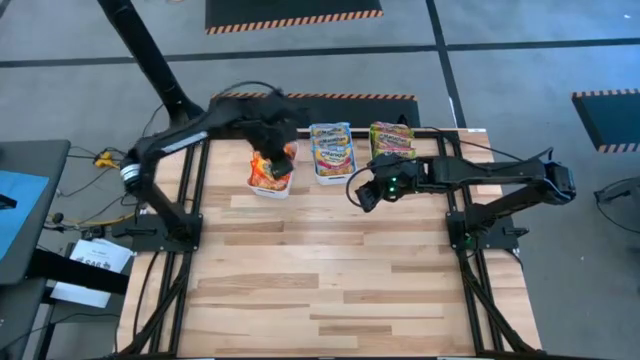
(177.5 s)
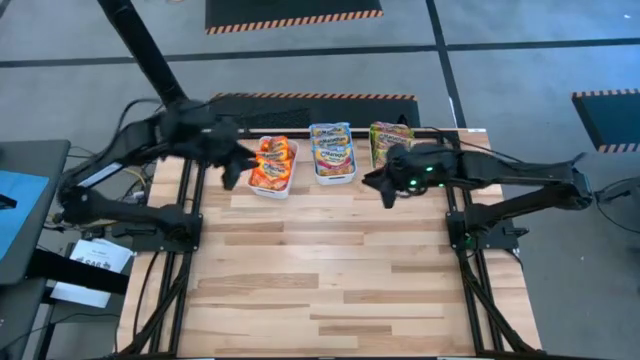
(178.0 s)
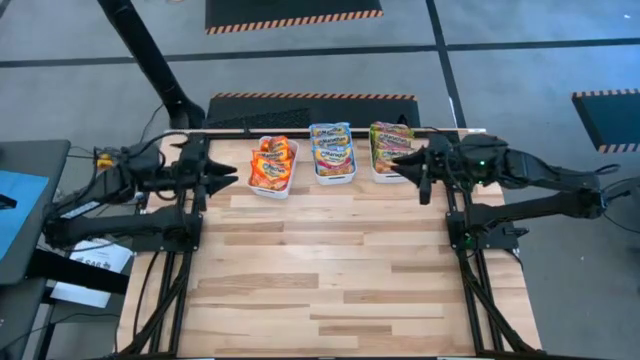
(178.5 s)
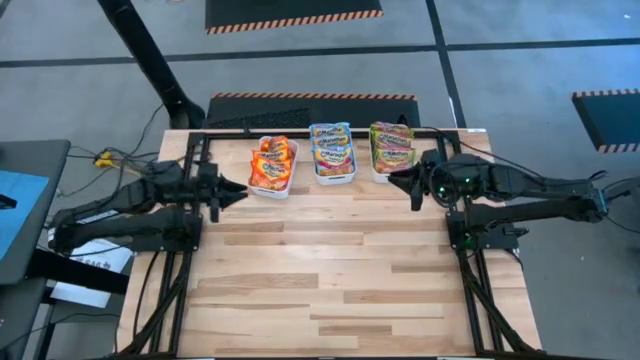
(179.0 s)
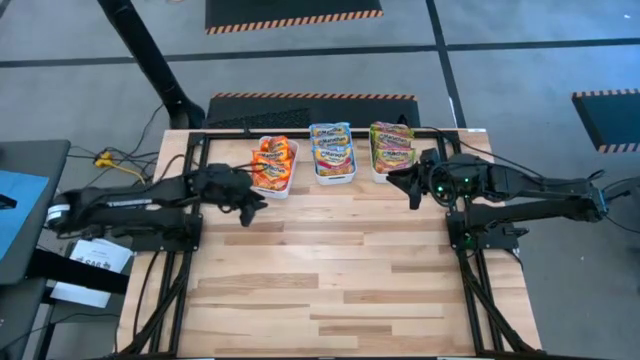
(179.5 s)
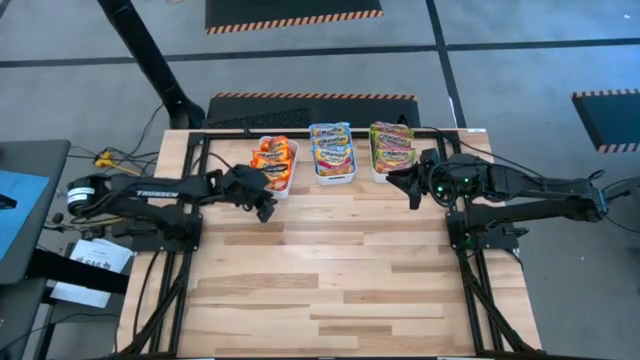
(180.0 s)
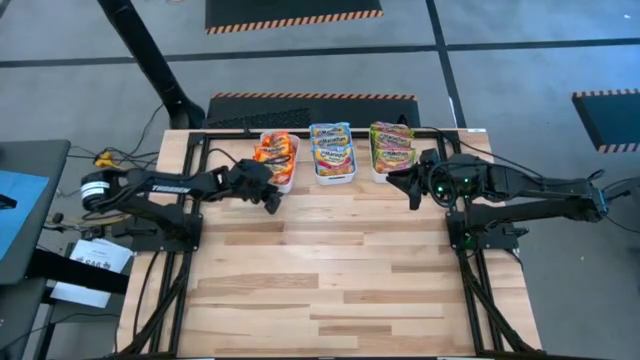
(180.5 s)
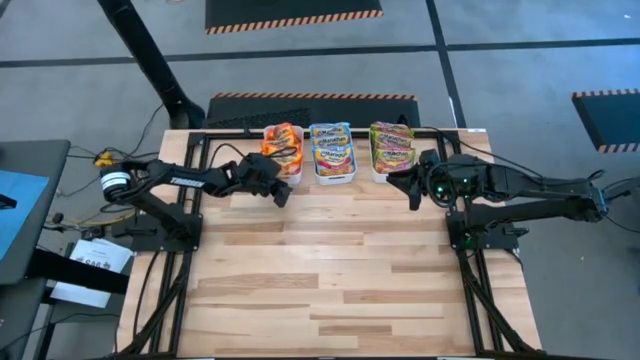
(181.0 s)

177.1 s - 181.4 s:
Task: Sort Maruchan noodles
Adjust the left white bin

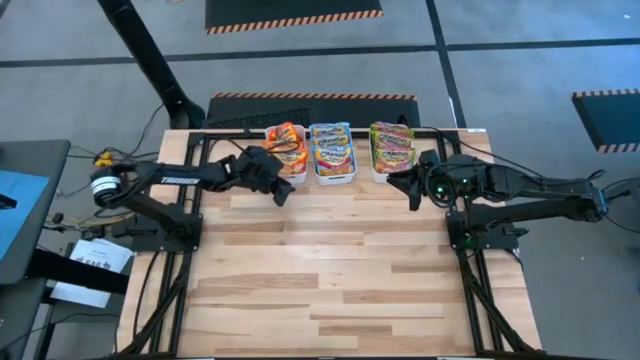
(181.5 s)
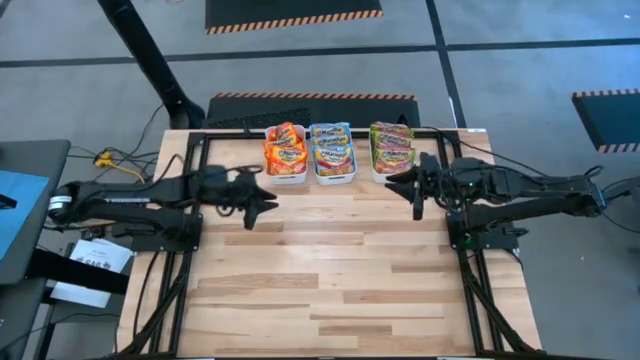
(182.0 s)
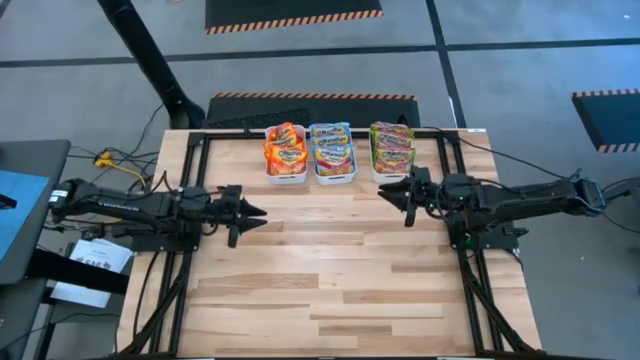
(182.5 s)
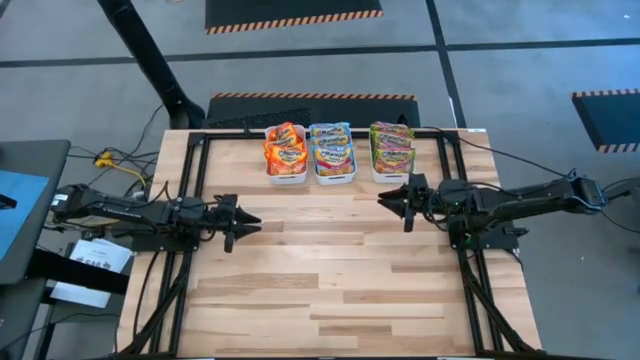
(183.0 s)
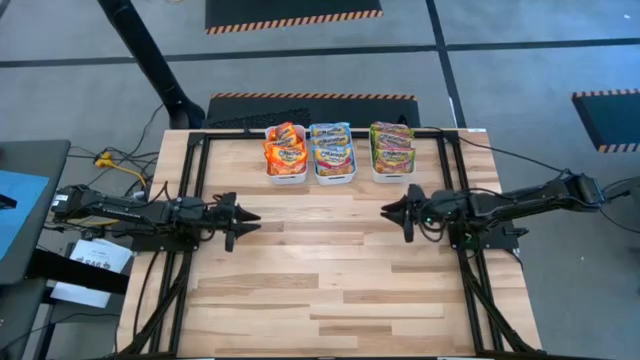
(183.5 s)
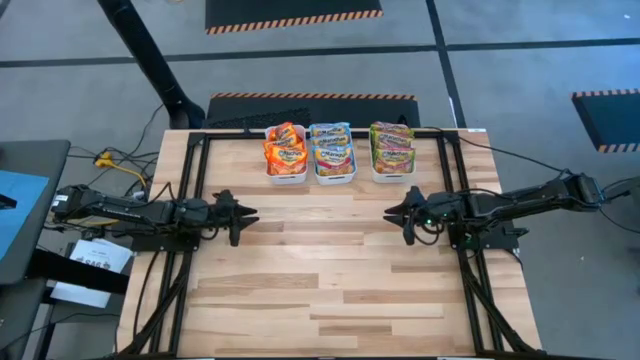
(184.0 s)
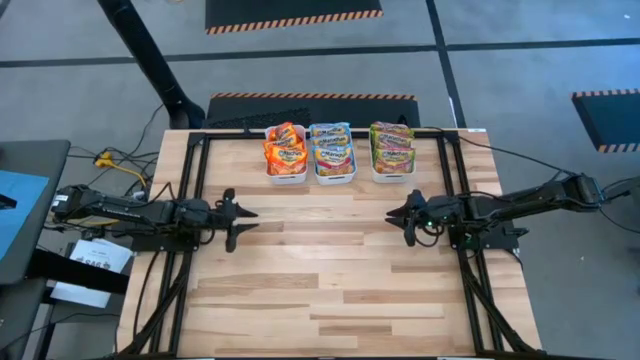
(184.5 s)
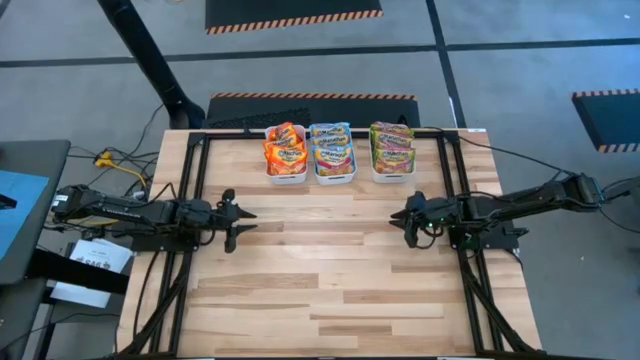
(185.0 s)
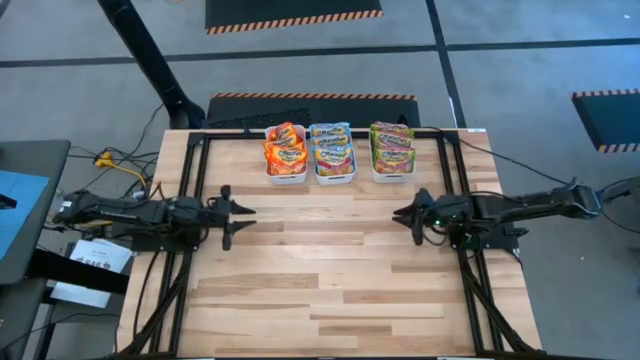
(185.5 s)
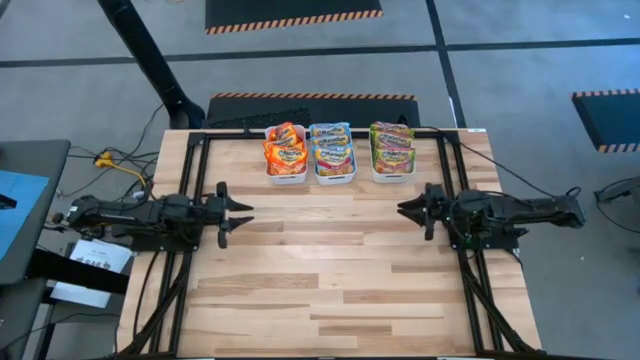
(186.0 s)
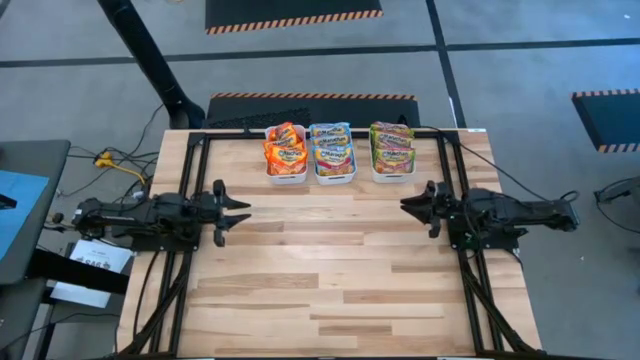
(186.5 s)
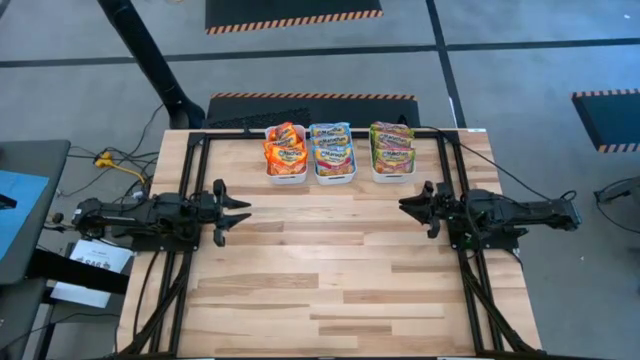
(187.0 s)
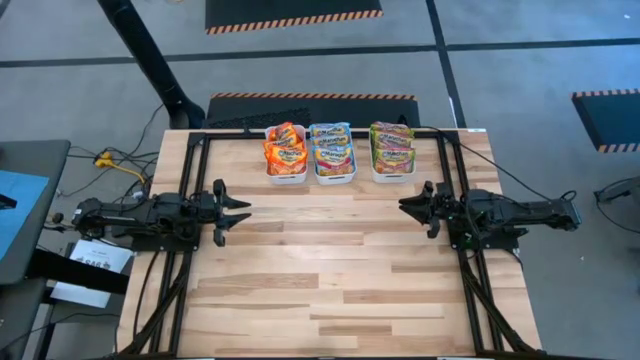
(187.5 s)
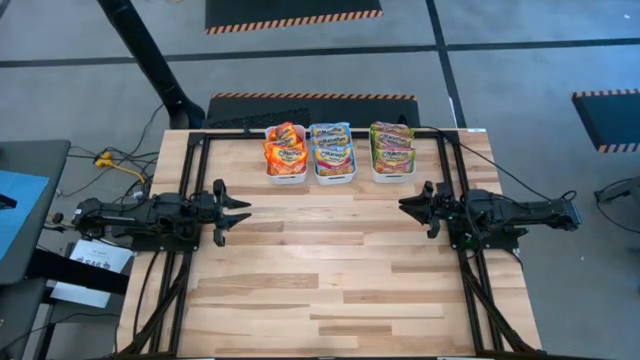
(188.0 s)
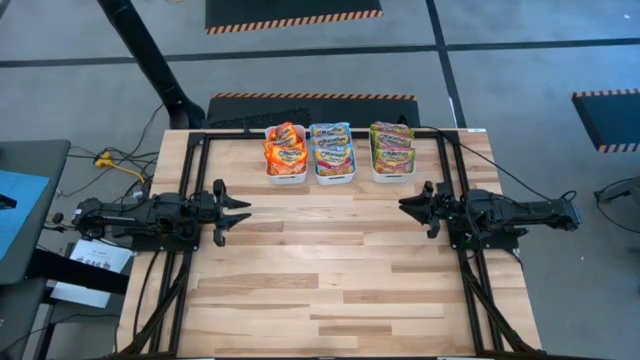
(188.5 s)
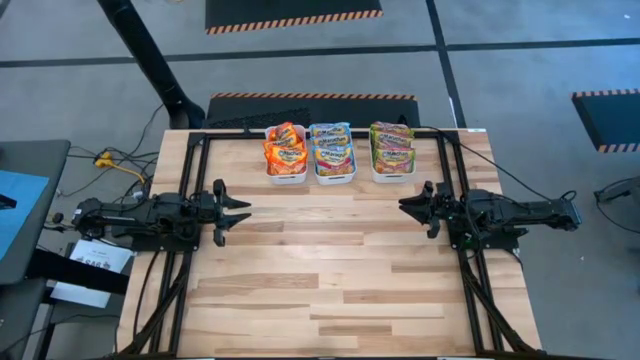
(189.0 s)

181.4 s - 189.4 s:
Return to Home Position

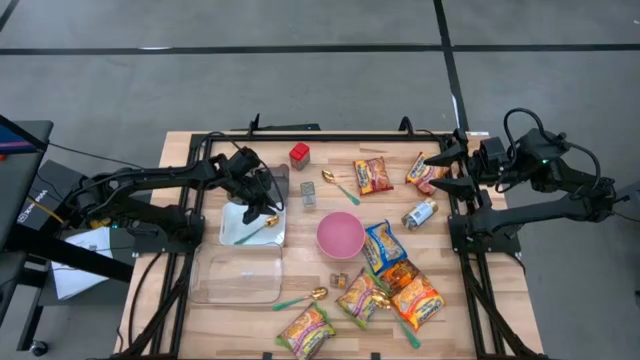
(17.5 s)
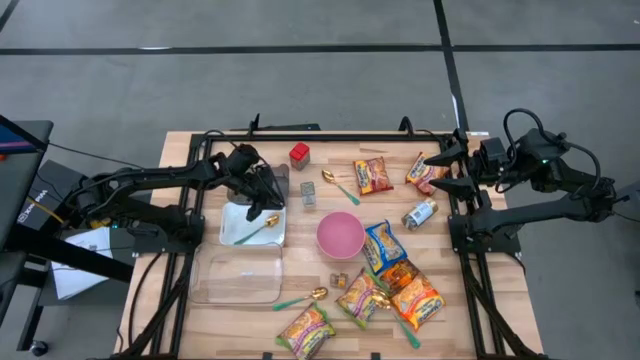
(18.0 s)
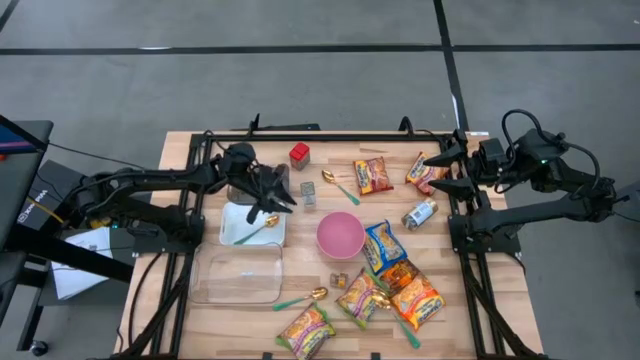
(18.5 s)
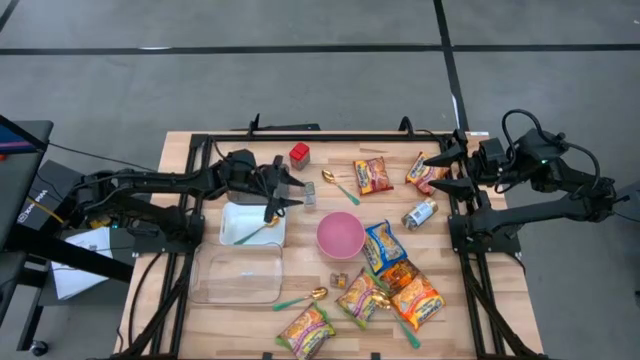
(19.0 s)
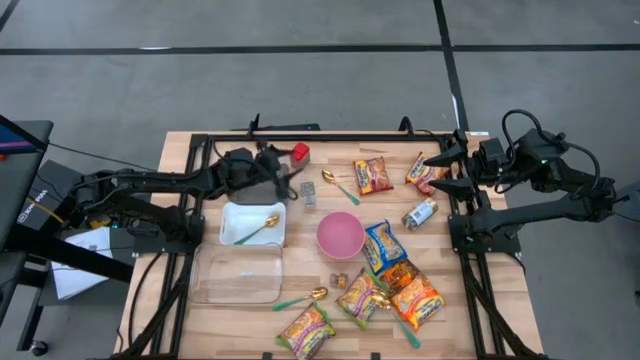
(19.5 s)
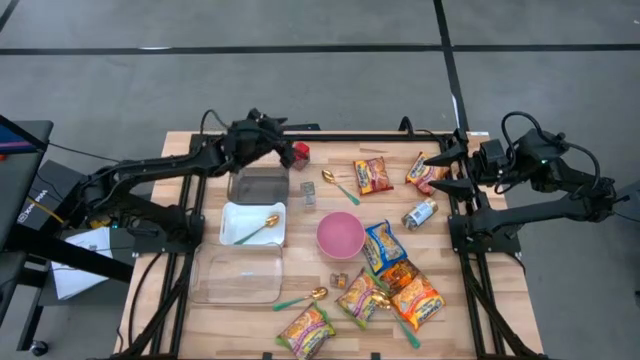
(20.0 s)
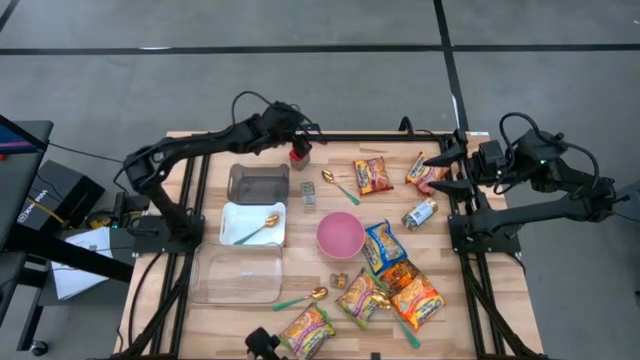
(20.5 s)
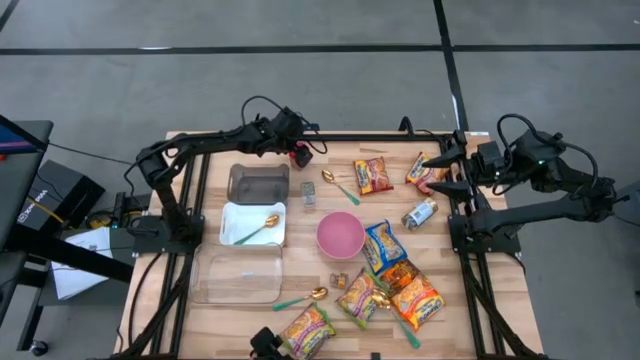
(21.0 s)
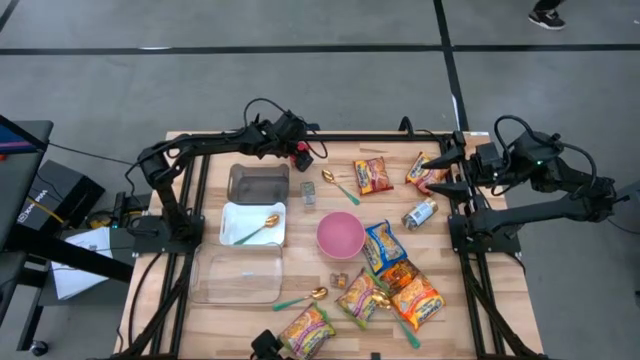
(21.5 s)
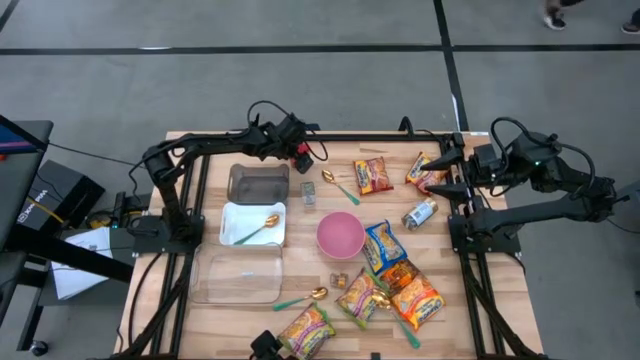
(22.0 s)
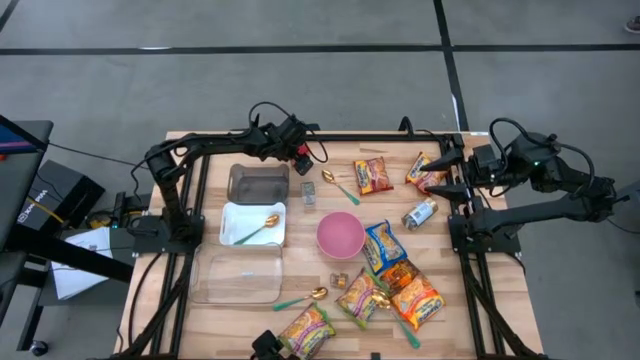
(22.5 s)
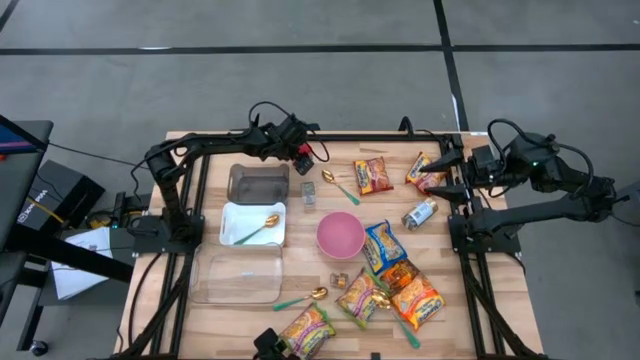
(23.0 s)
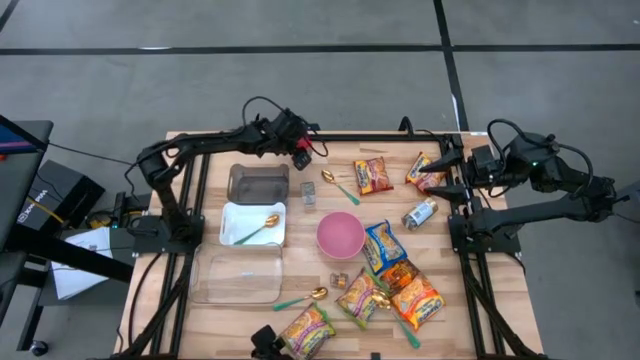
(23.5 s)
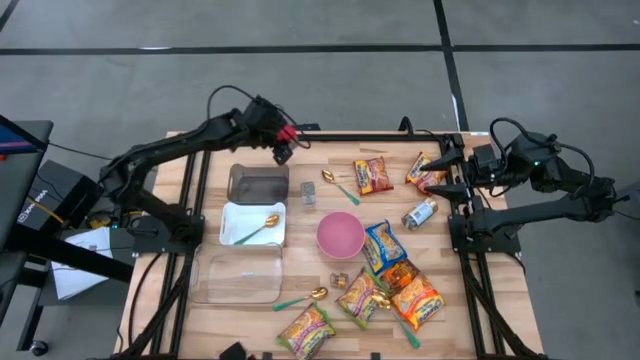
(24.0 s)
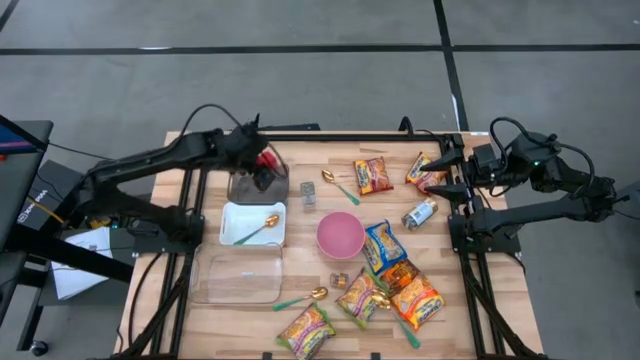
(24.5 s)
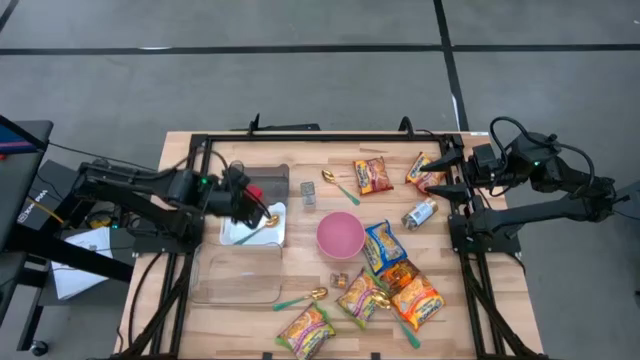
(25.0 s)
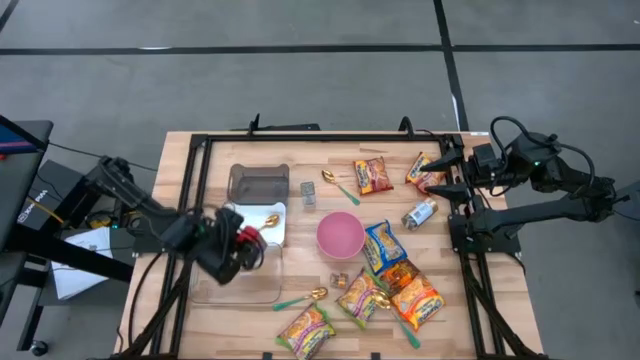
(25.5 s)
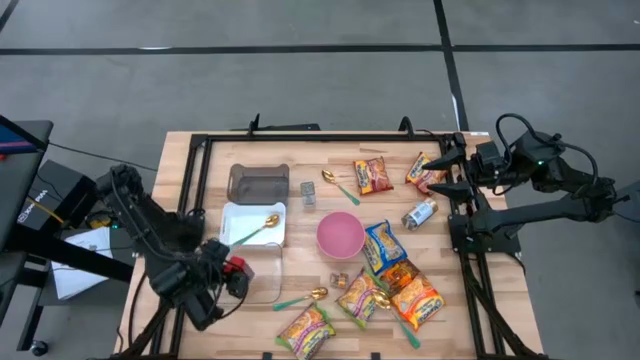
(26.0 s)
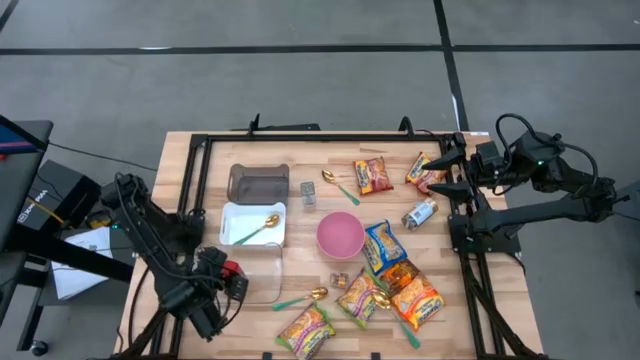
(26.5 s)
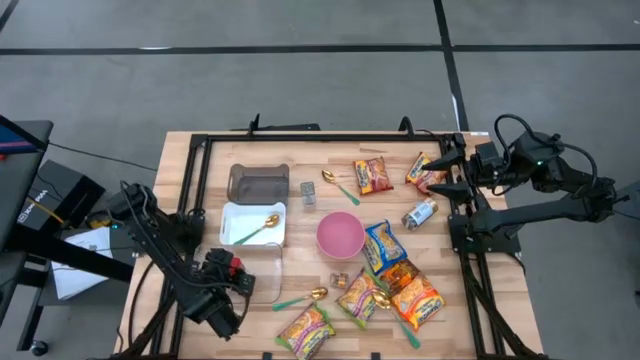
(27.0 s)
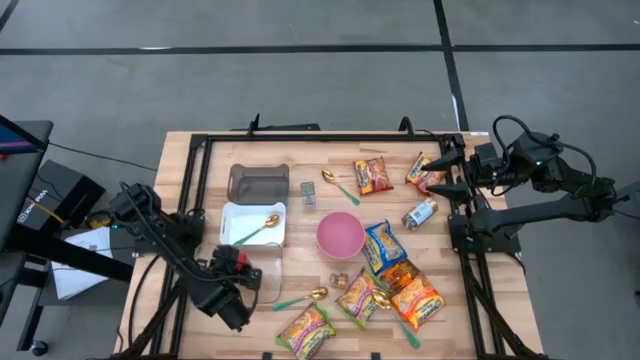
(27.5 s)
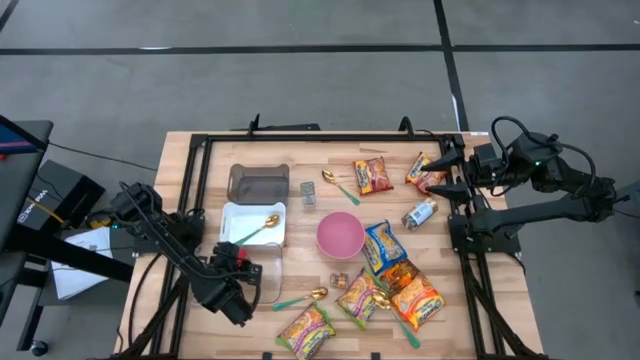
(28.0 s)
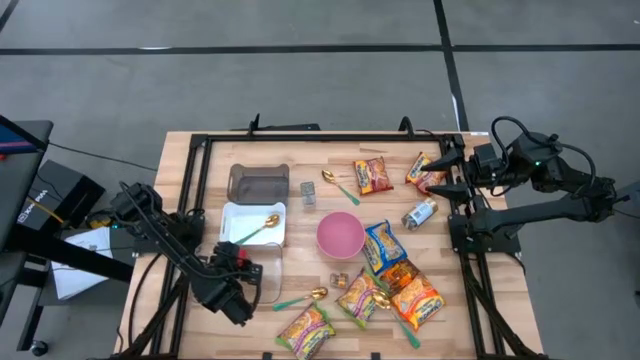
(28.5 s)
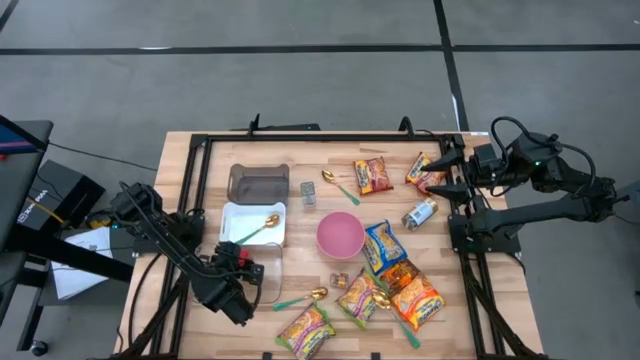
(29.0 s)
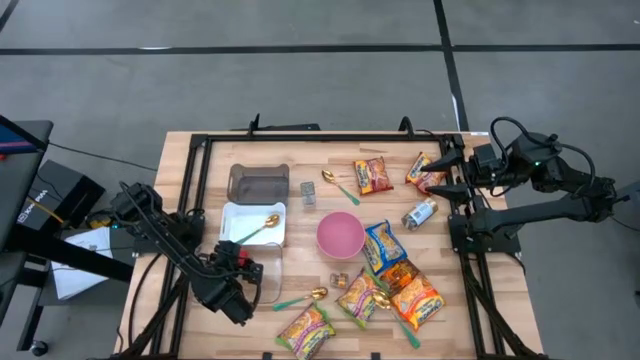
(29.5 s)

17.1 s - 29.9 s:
Task: Pick & Place Food Item
Put the red spice can into the transparent bin
